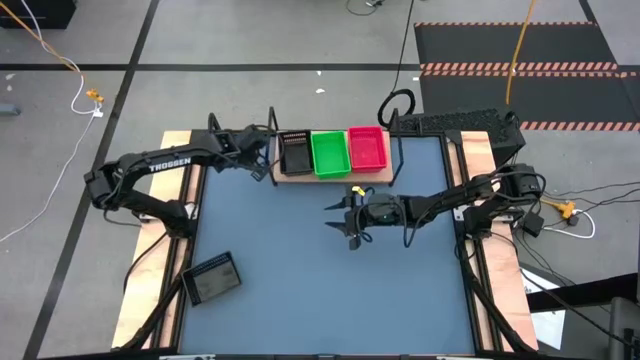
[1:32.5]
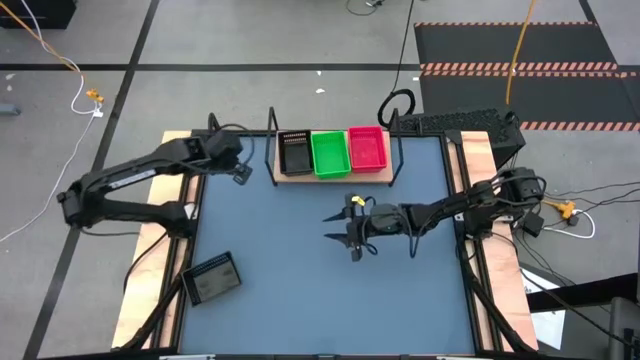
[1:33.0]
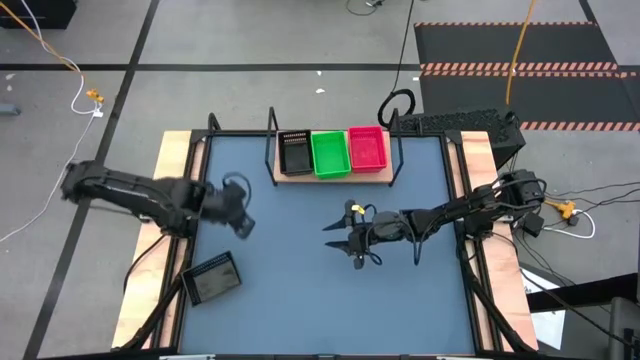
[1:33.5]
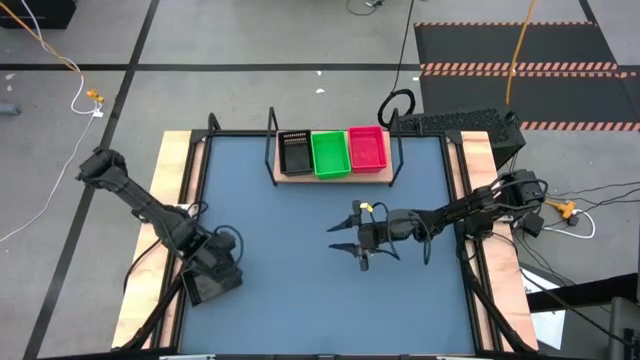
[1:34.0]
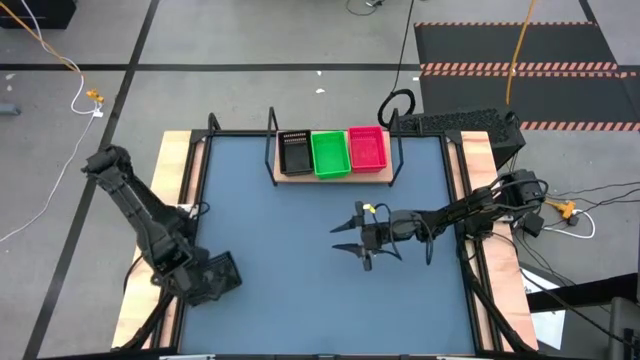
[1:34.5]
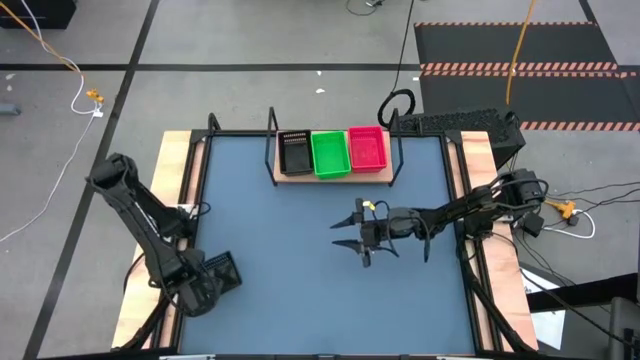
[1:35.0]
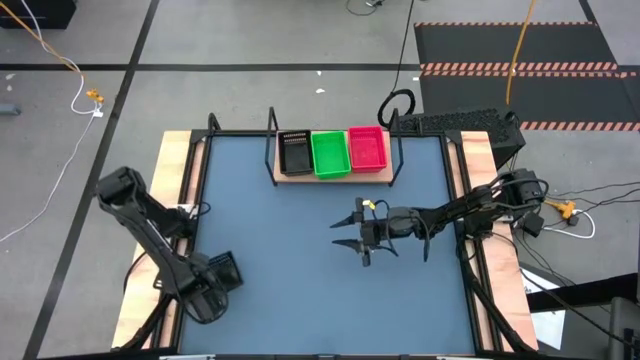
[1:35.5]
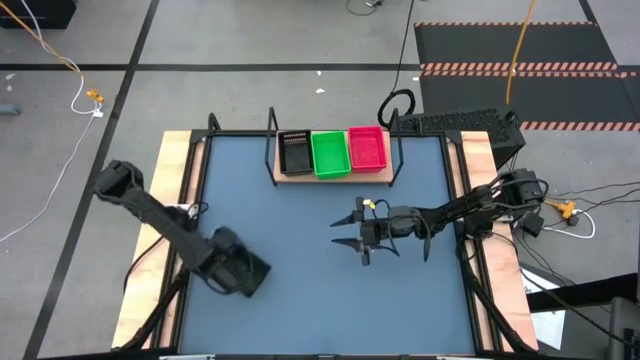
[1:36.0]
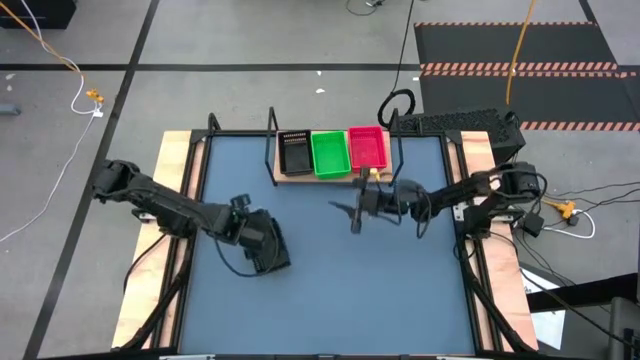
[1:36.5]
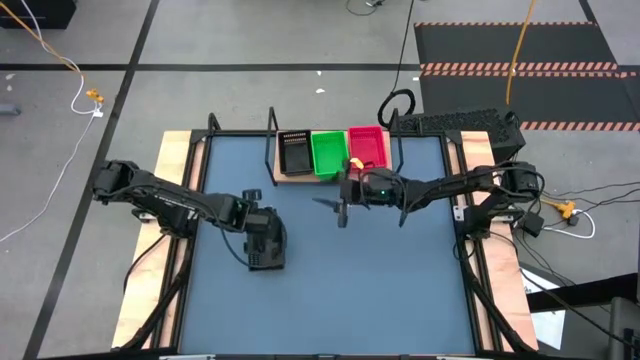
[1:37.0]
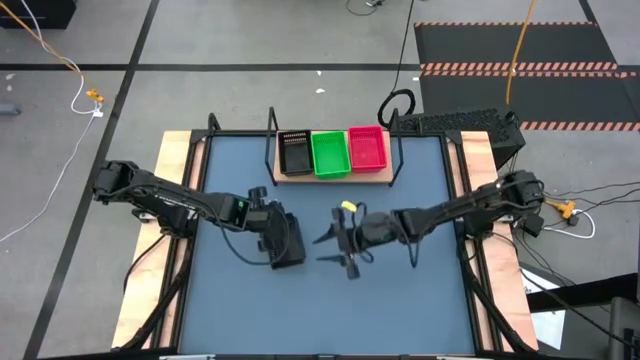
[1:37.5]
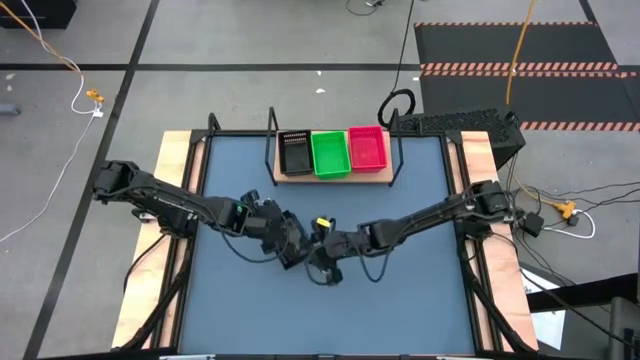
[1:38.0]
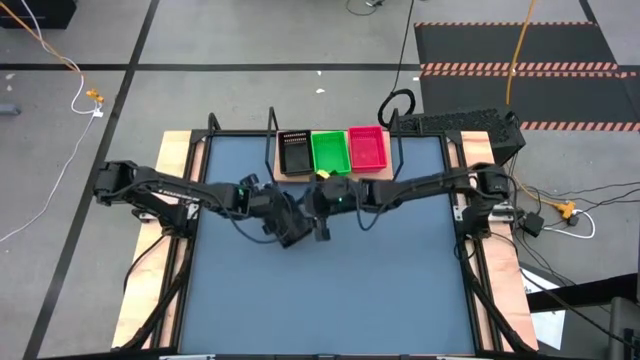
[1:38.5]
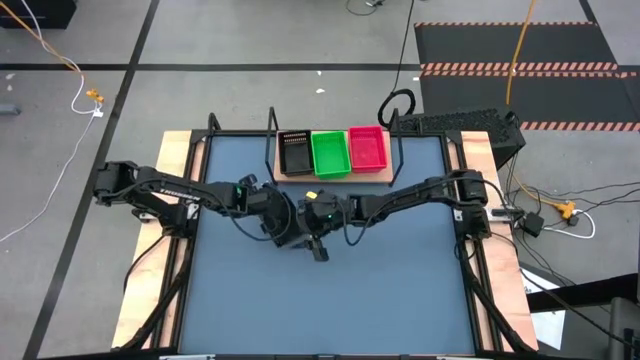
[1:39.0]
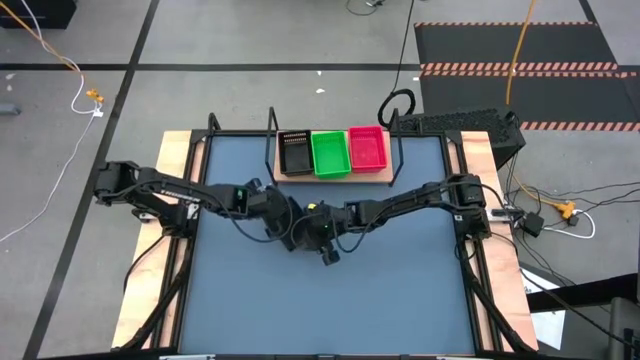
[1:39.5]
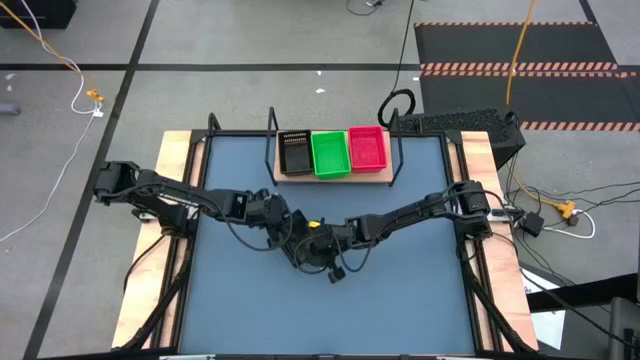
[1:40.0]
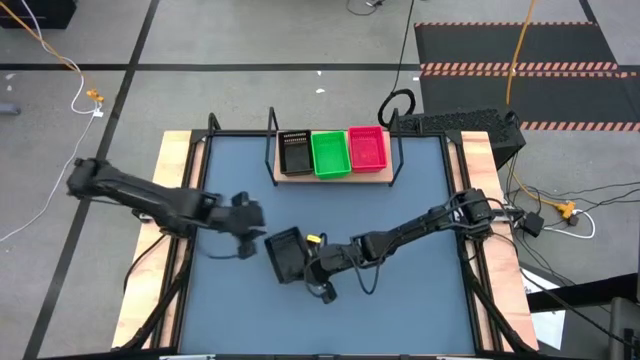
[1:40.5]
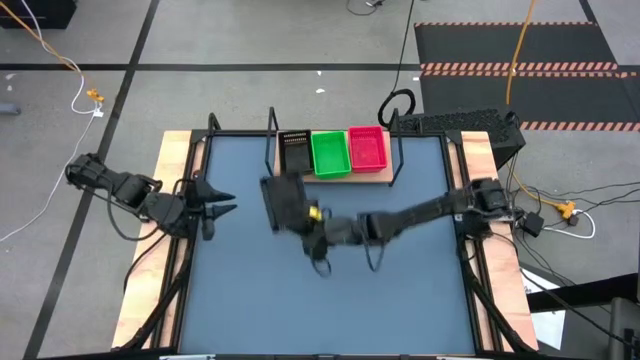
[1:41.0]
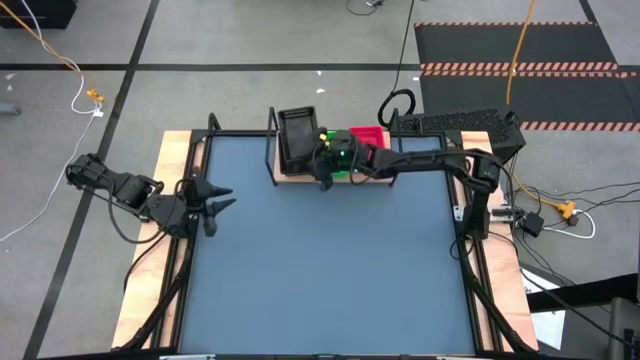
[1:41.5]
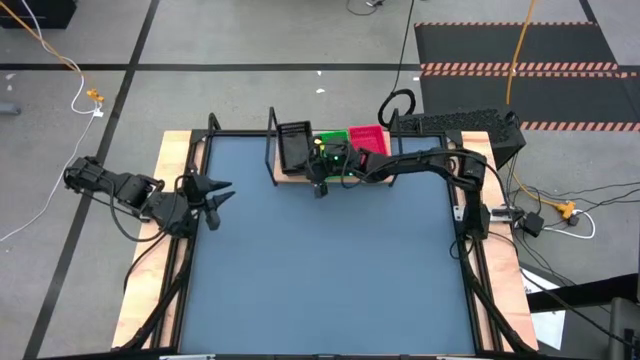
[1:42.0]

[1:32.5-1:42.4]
Task: Stack baskets on shelf by color
Stack the black bin on top of the black bin on the shelf

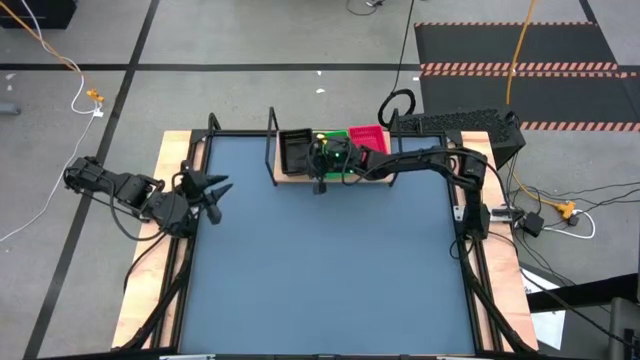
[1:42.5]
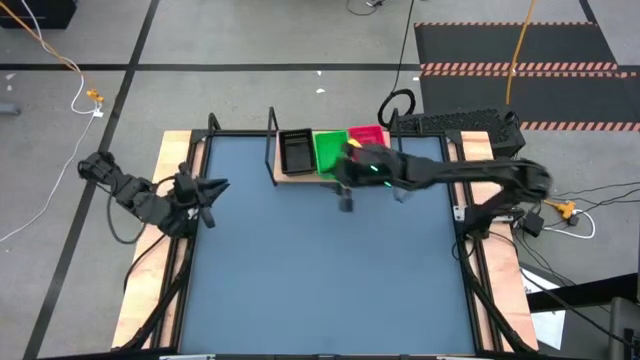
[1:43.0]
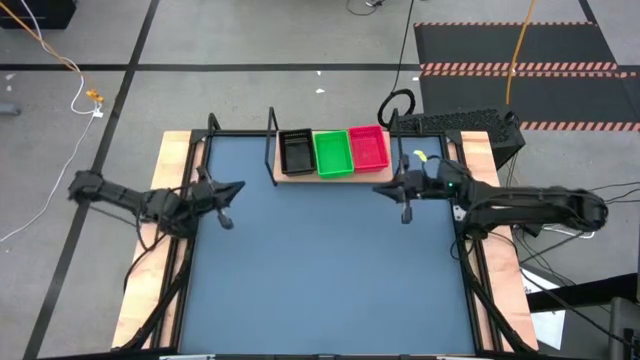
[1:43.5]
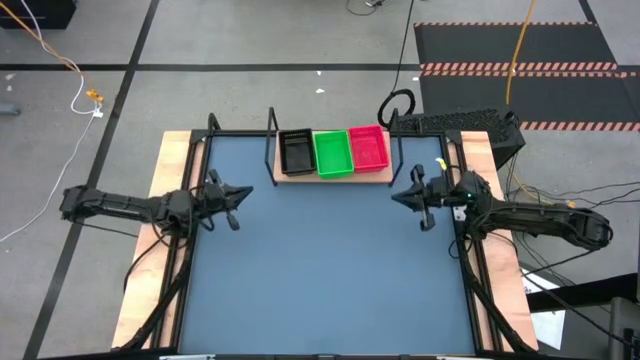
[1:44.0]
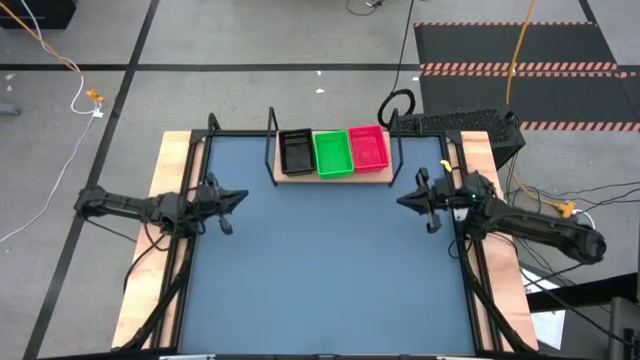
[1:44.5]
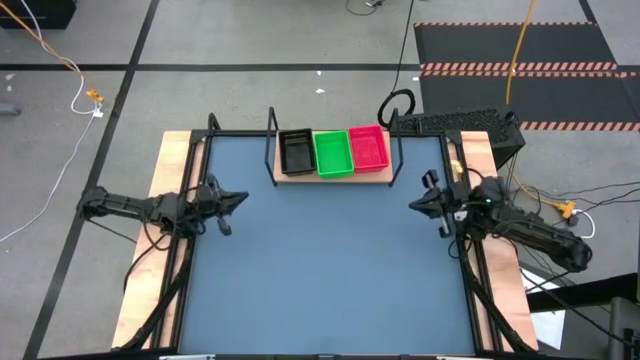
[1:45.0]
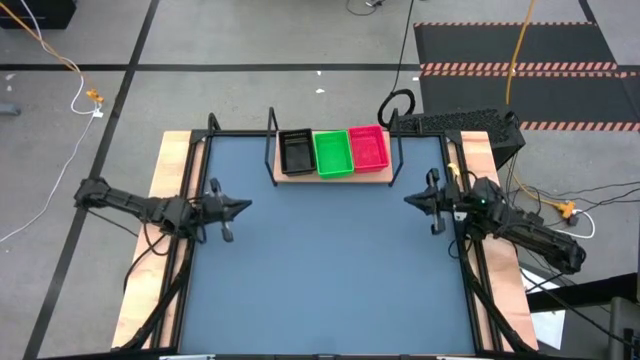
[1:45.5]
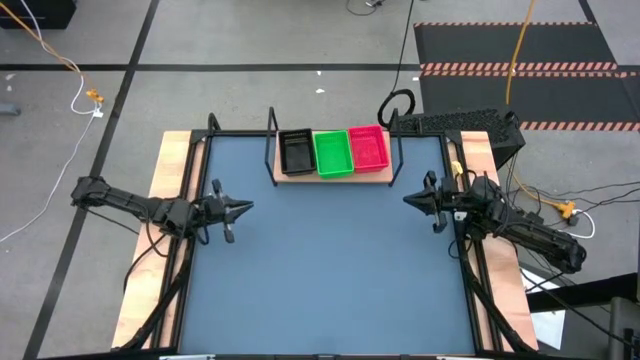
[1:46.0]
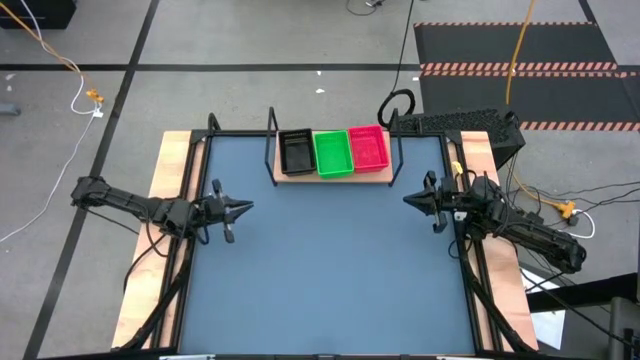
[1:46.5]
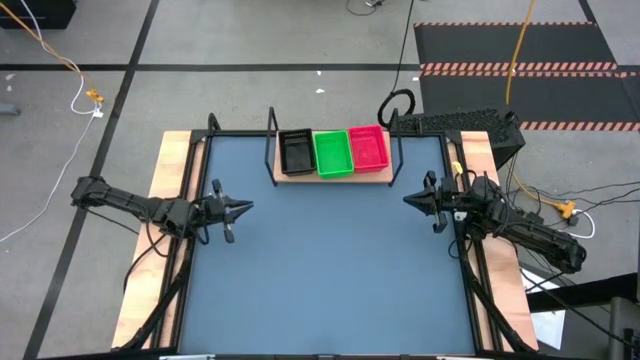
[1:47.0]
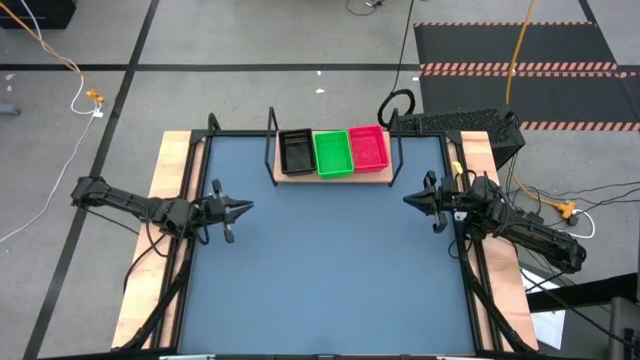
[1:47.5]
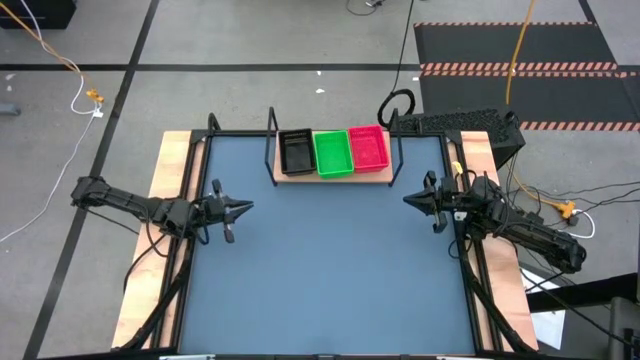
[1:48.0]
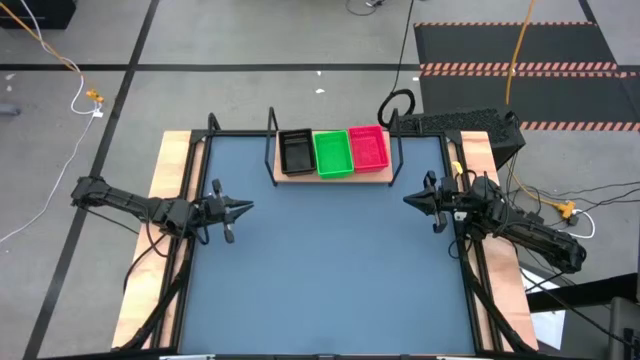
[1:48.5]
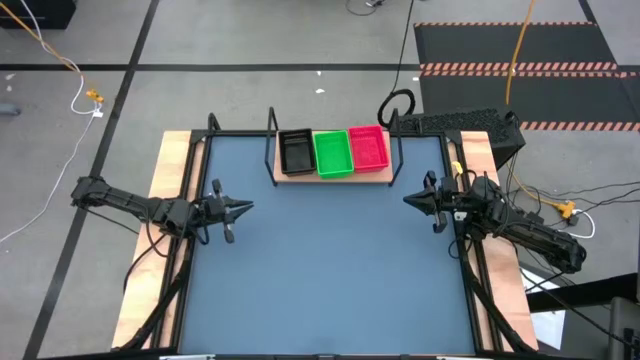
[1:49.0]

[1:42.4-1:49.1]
Return to Home Position

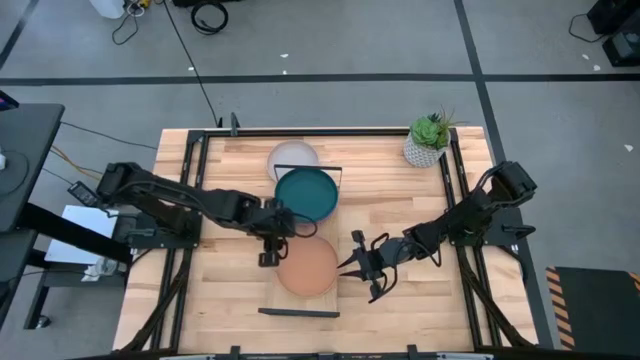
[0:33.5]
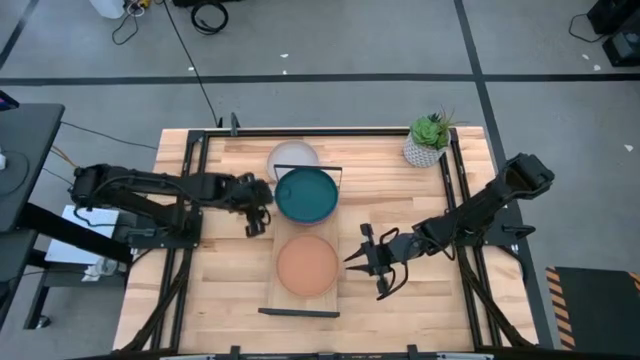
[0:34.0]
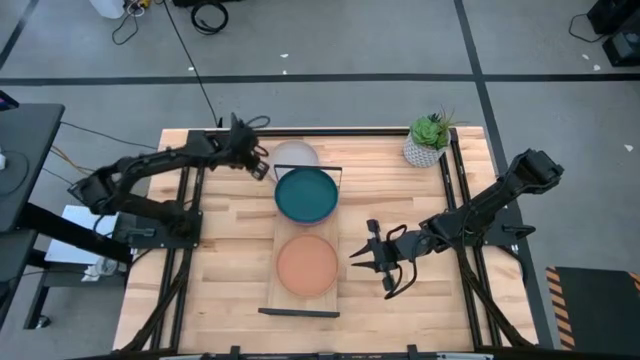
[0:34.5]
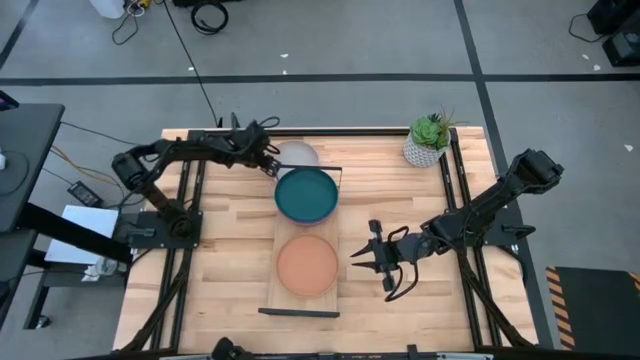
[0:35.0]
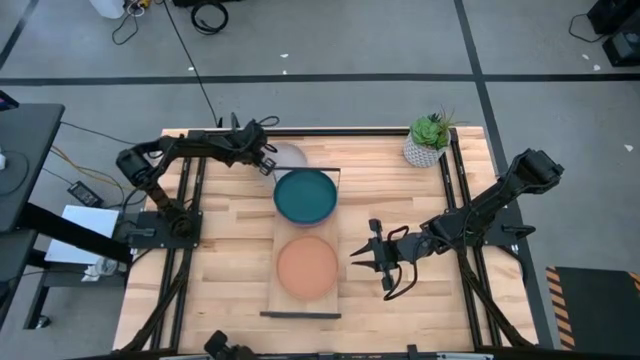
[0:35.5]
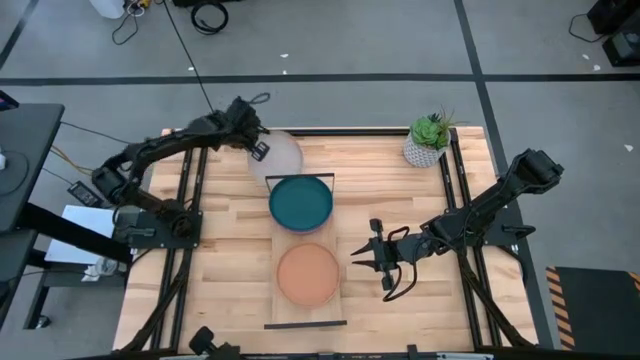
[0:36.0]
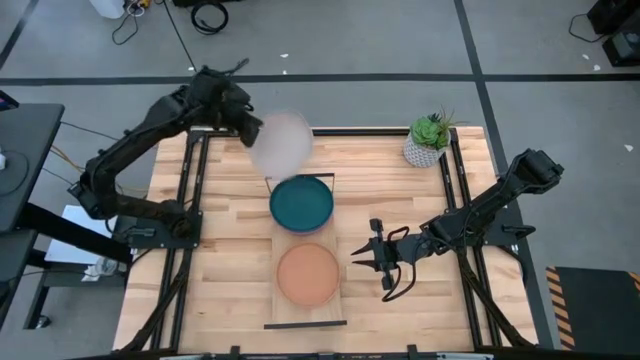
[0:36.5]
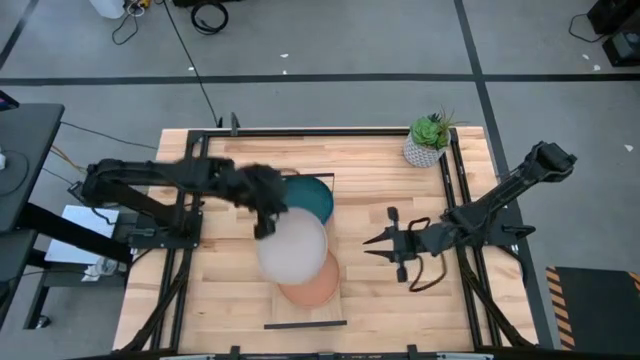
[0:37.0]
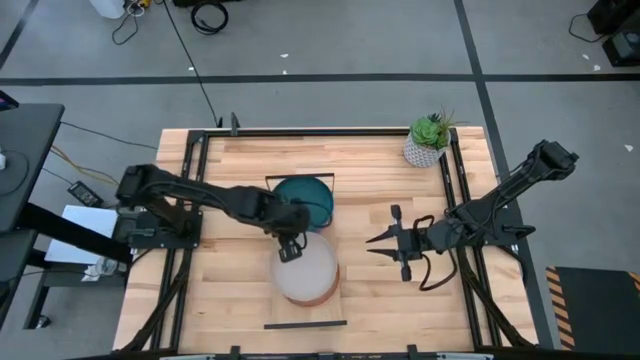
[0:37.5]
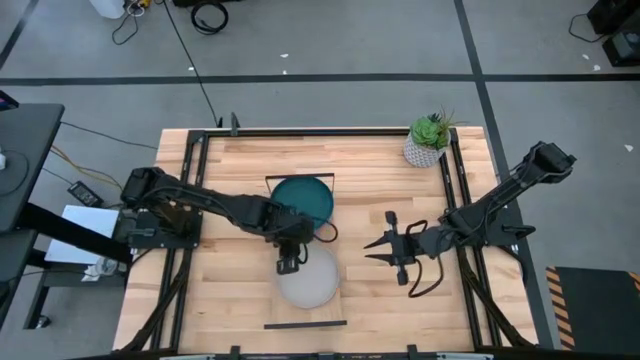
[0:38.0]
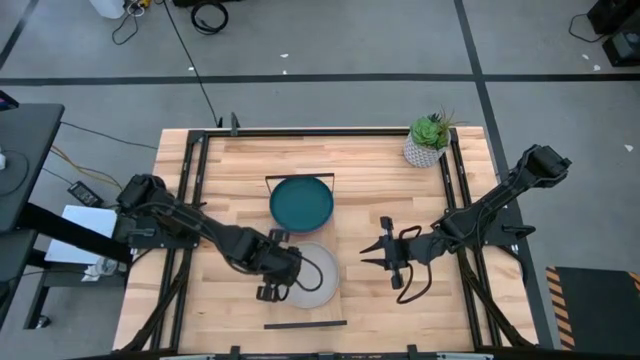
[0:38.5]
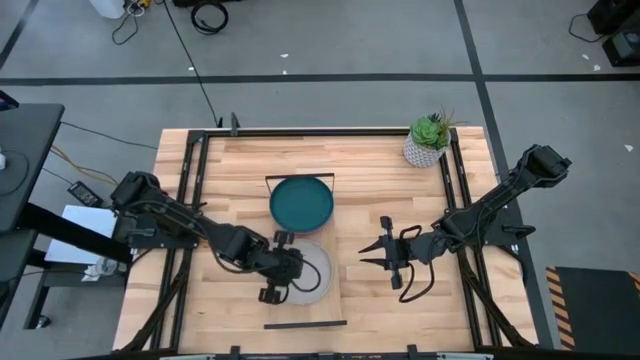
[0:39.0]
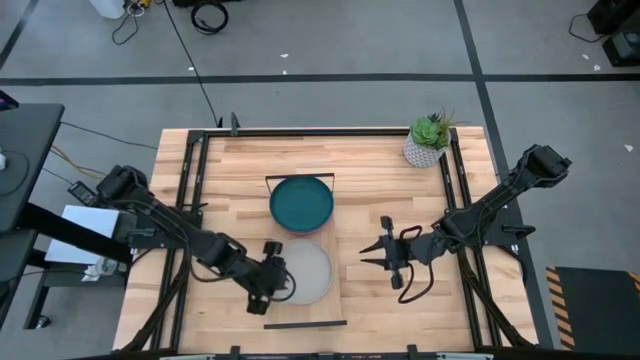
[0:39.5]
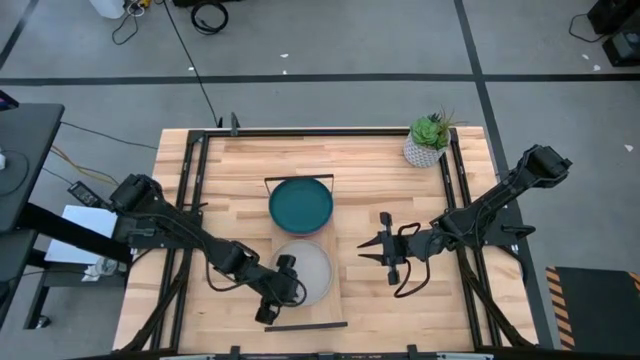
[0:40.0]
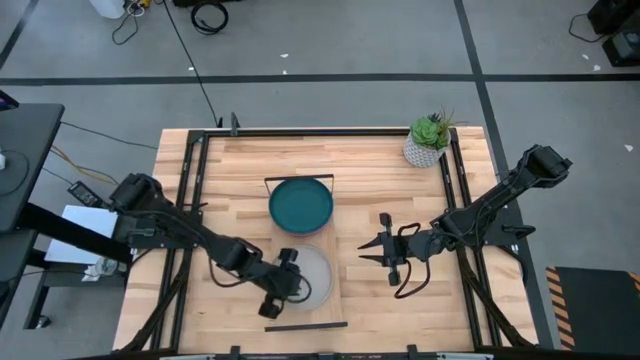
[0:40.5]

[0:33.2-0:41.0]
Task: Place and stack plates onto a shelf
Stack the gray plate on top of the brown plate on the shelf
